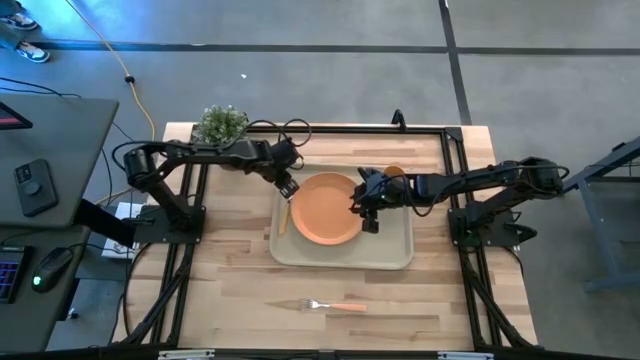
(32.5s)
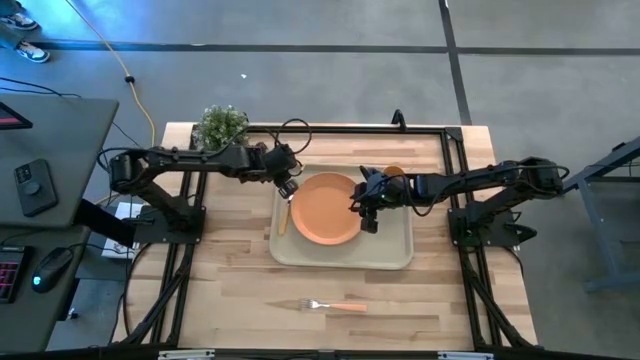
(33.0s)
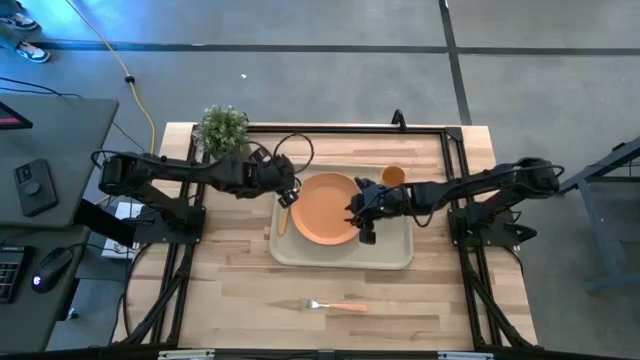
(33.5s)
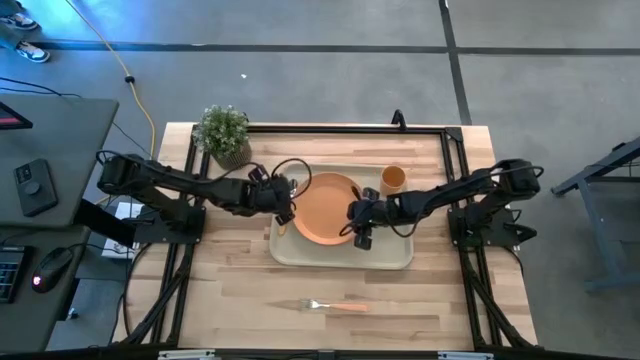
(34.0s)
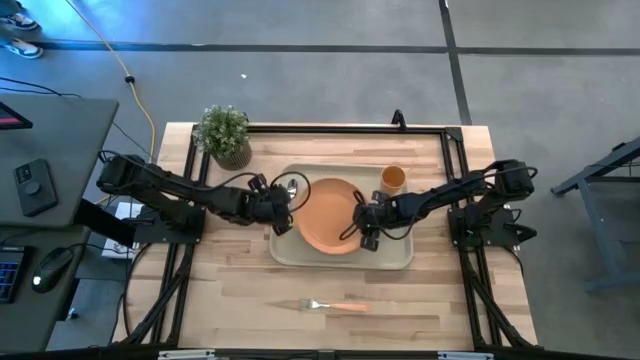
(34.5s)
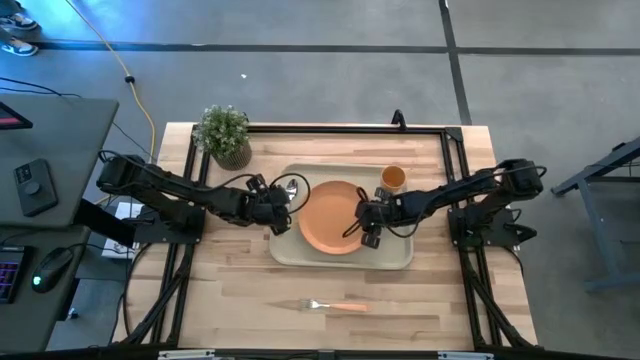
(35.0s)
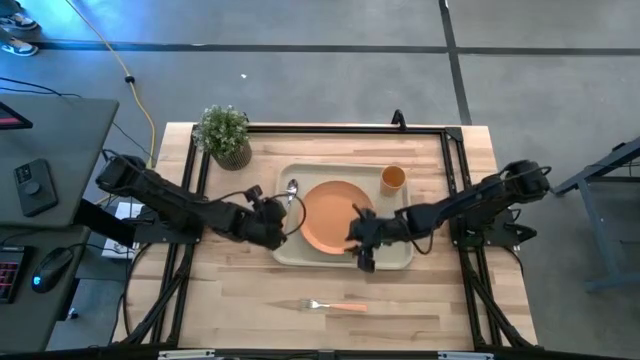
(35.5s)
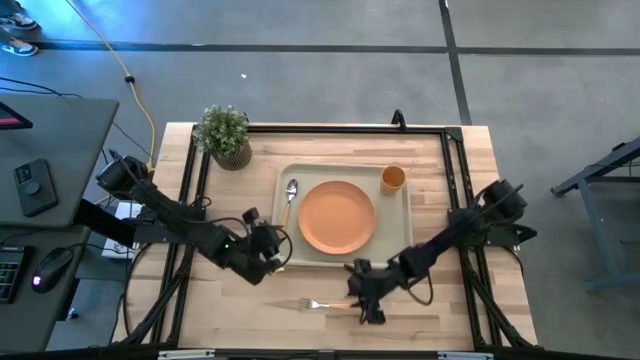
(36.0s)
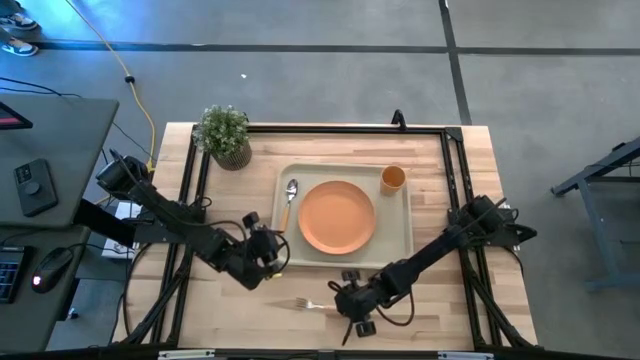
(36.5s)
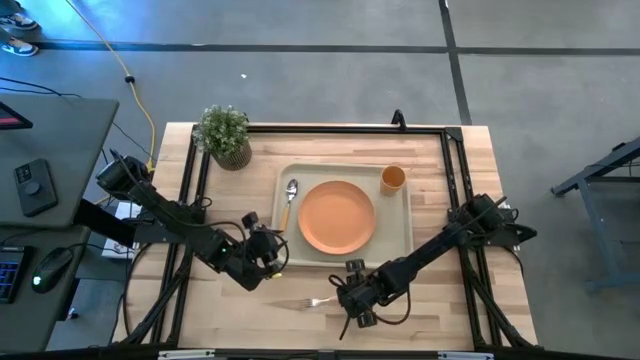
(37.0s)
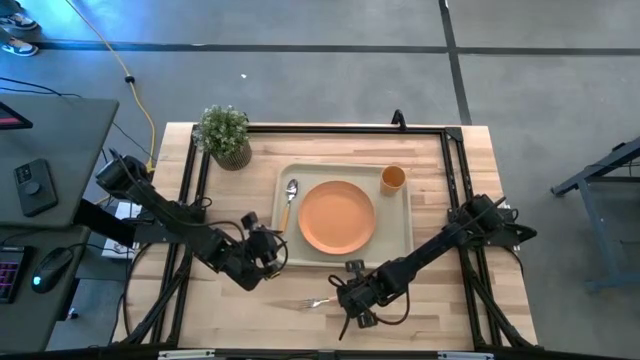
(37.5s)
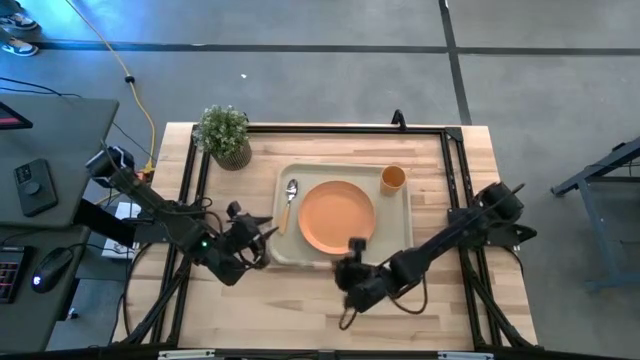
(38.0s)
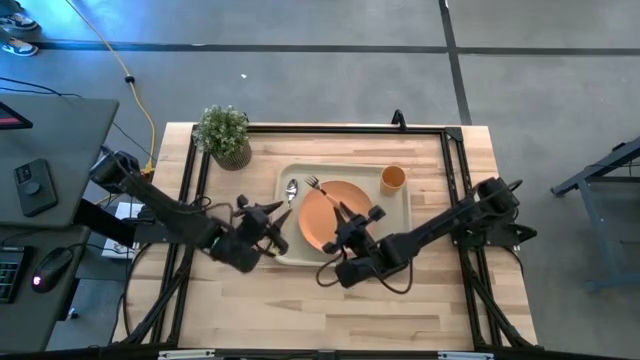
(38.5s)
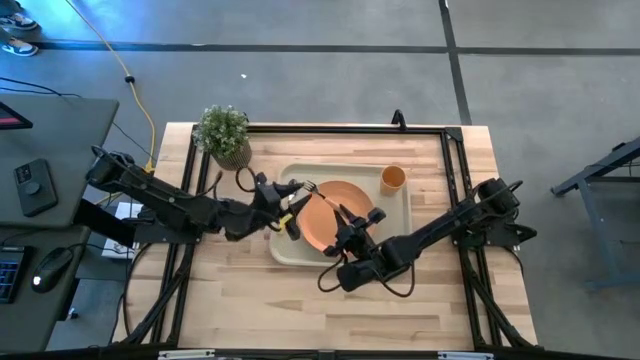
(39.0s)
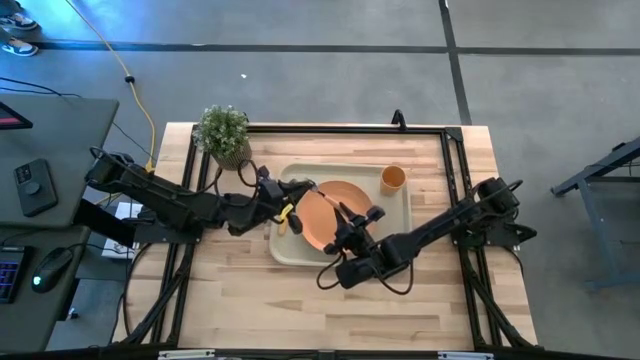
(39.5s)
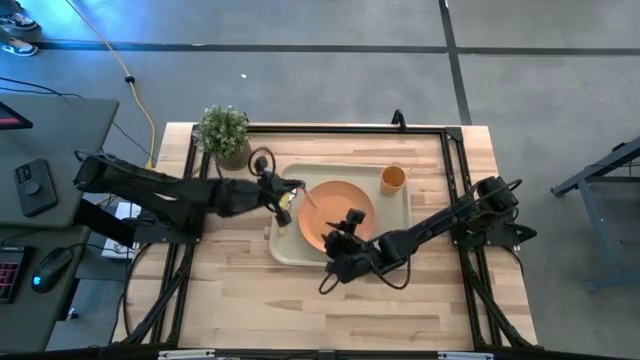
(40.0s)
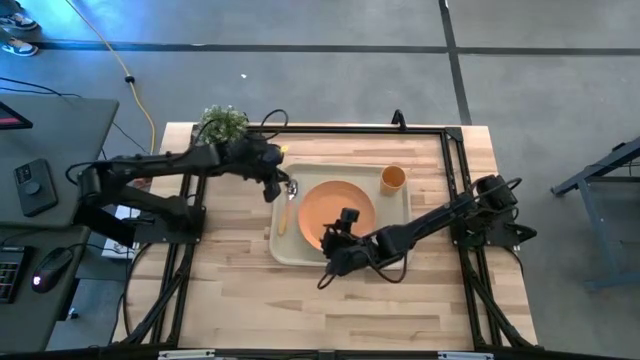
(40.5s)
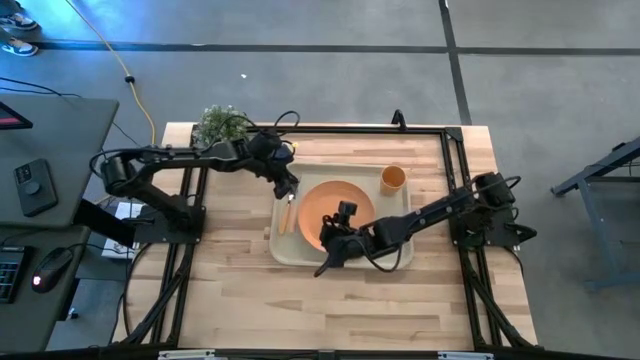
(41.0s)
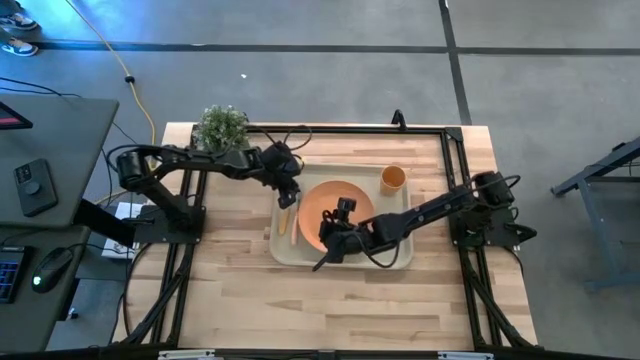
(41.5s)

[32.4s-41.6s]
Task: Pick and place plate/cup/fork/spoon on tray
Put the orange fork to the left of the orange plate on the tray

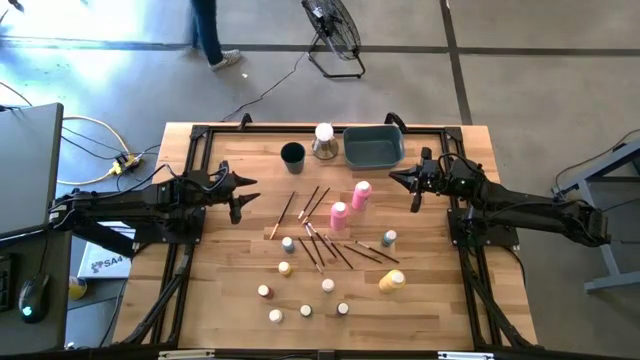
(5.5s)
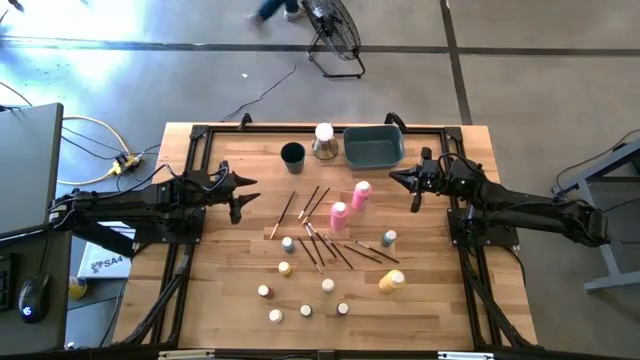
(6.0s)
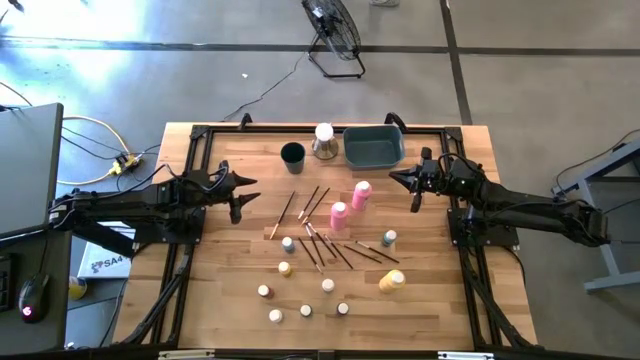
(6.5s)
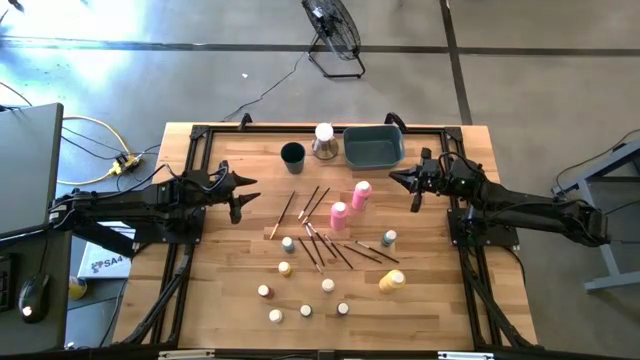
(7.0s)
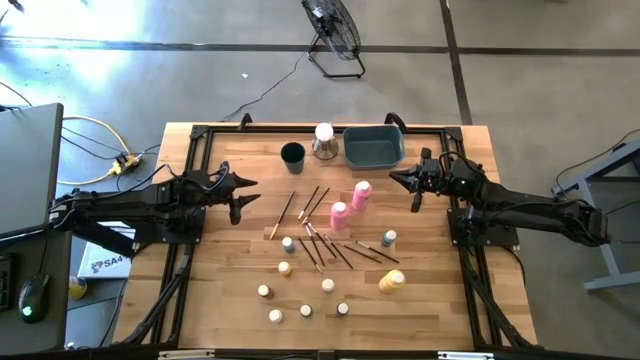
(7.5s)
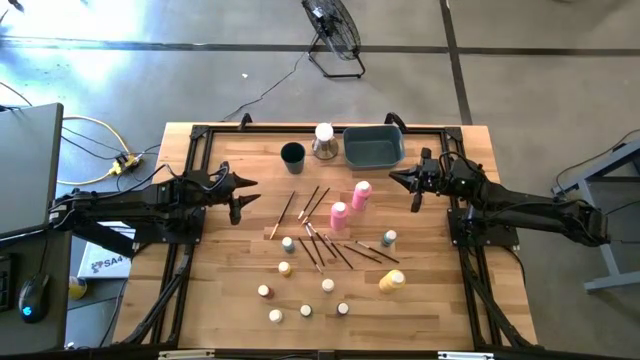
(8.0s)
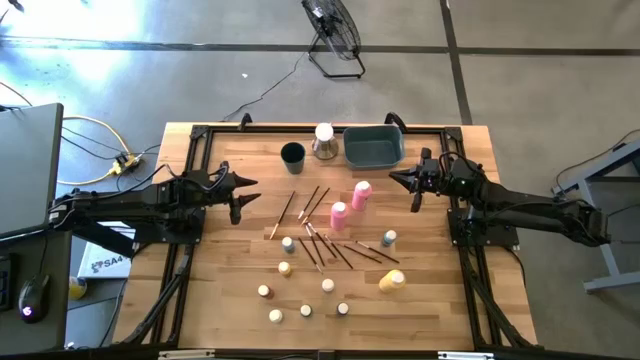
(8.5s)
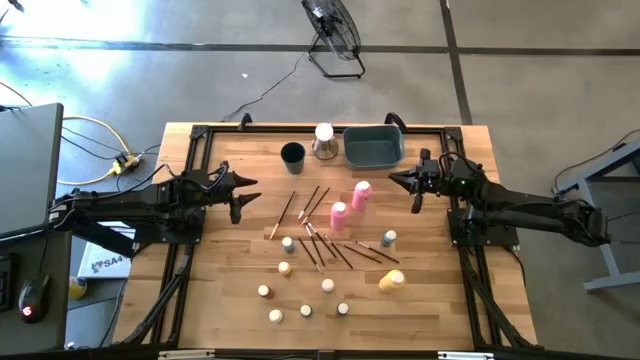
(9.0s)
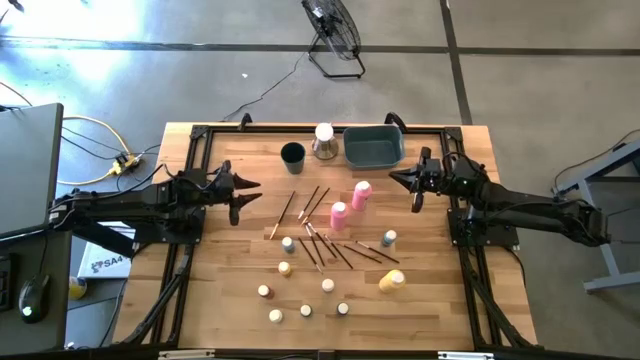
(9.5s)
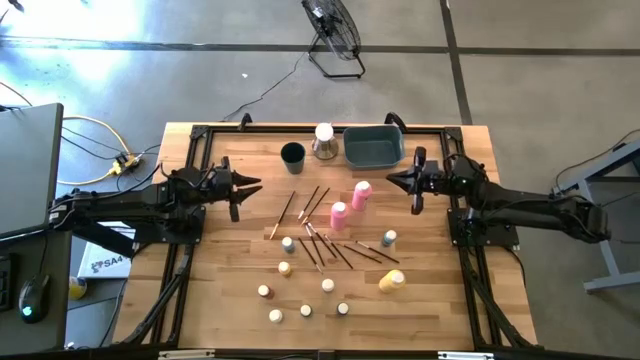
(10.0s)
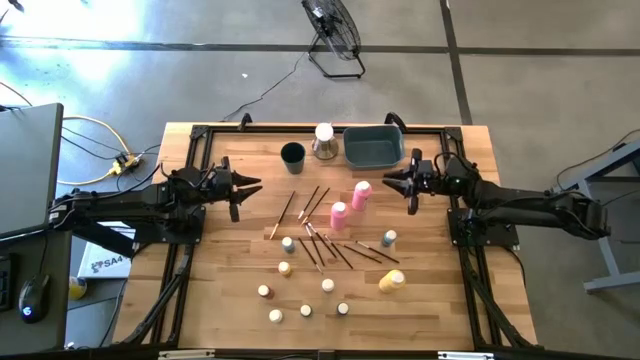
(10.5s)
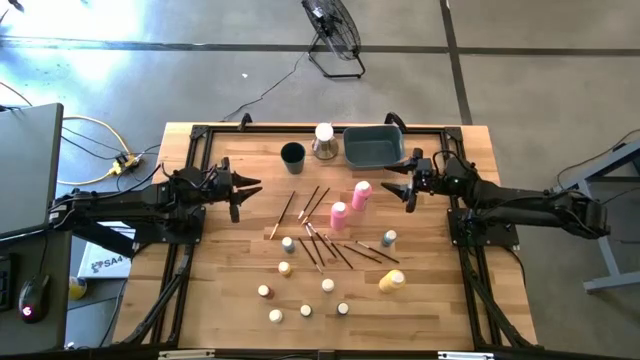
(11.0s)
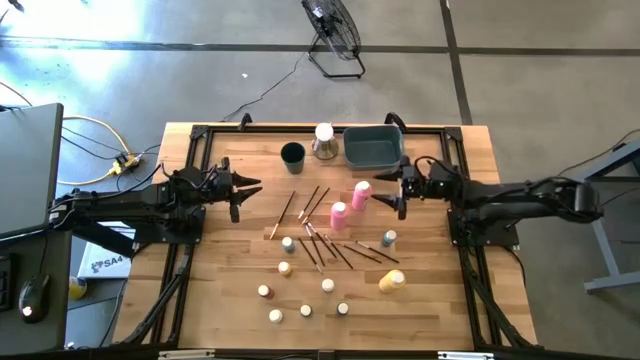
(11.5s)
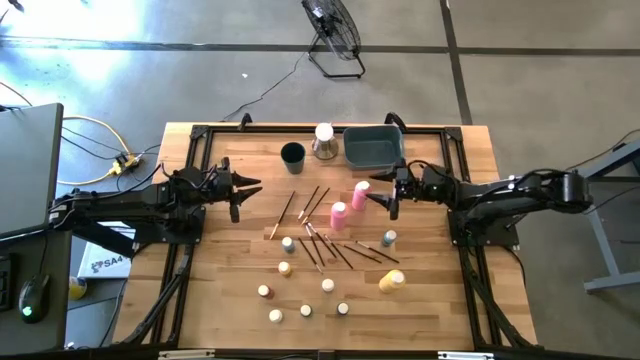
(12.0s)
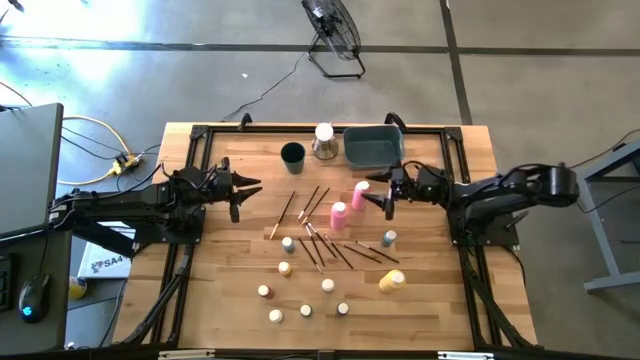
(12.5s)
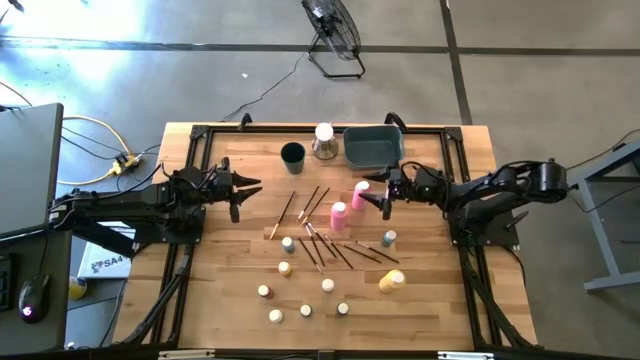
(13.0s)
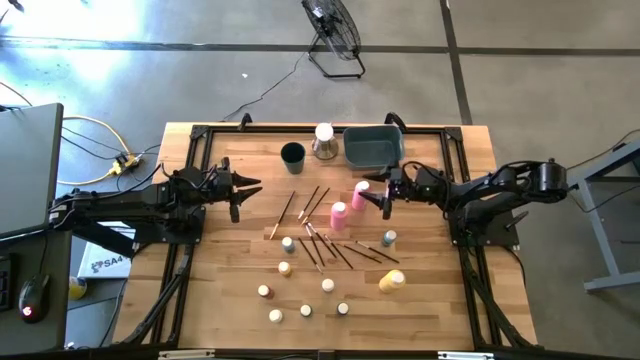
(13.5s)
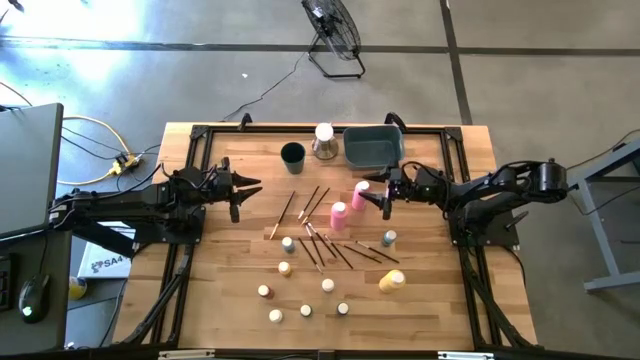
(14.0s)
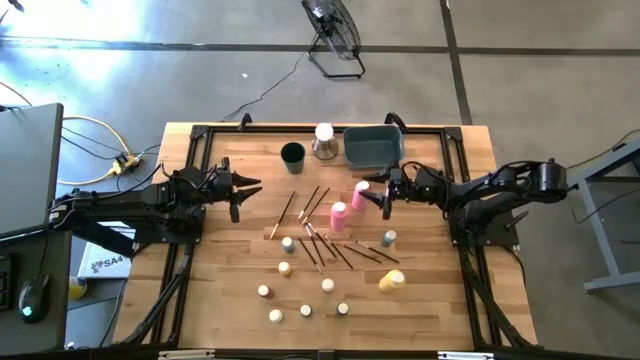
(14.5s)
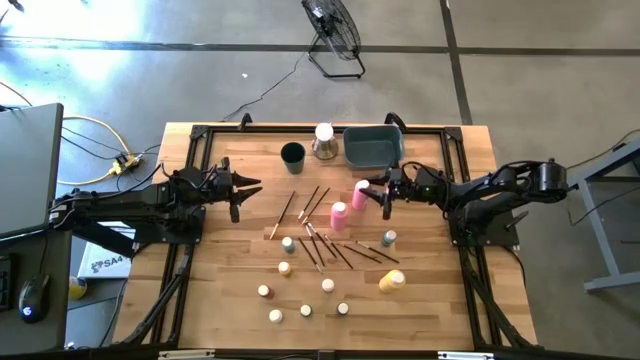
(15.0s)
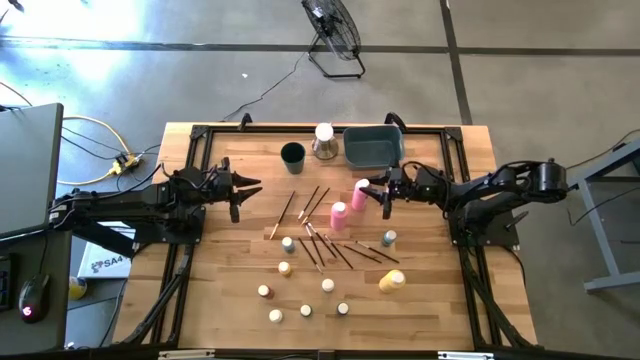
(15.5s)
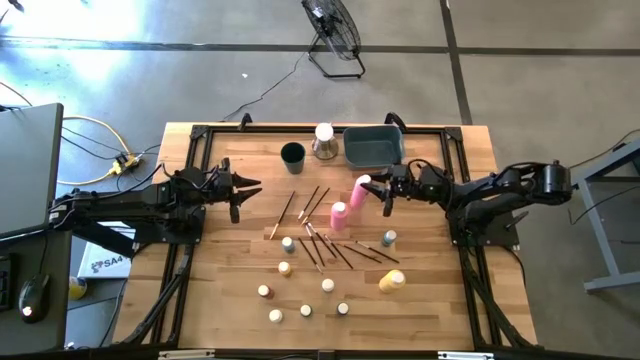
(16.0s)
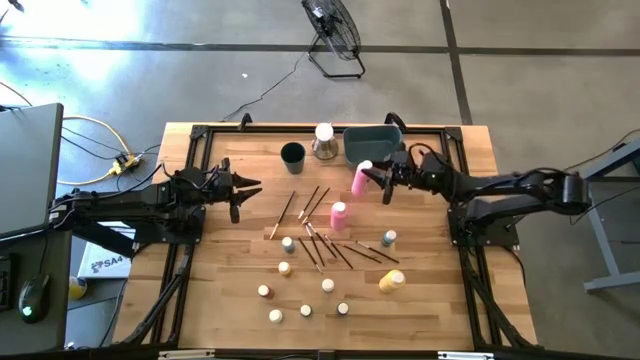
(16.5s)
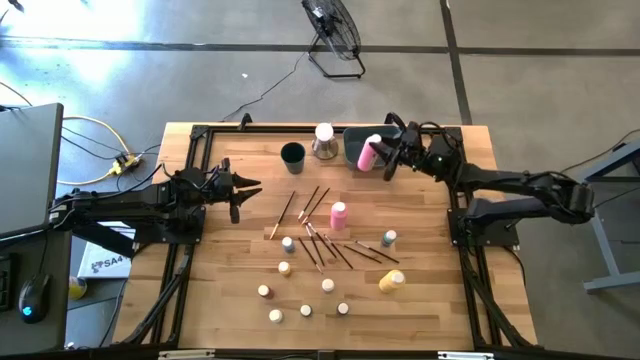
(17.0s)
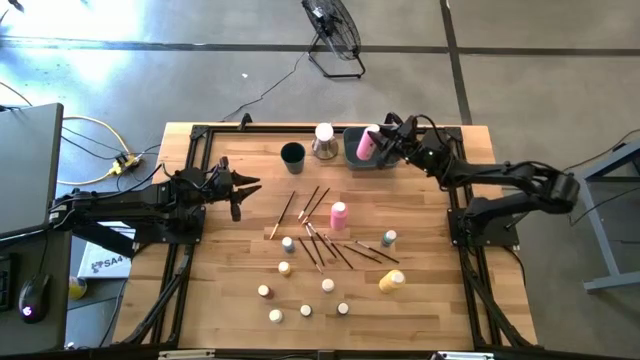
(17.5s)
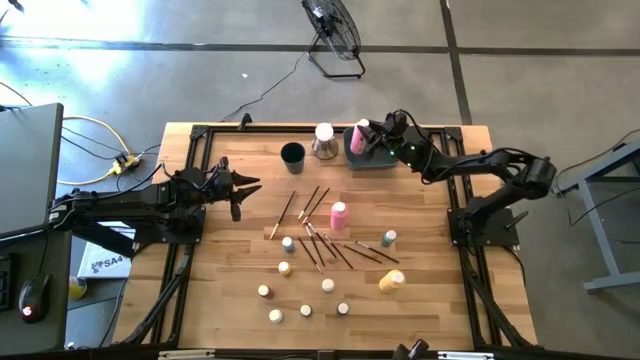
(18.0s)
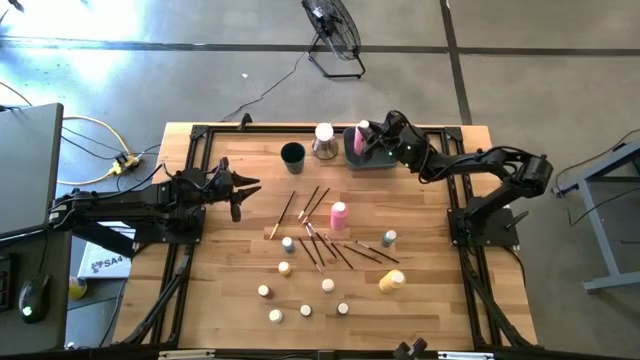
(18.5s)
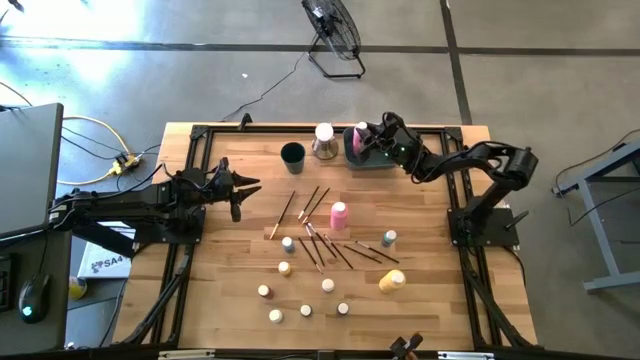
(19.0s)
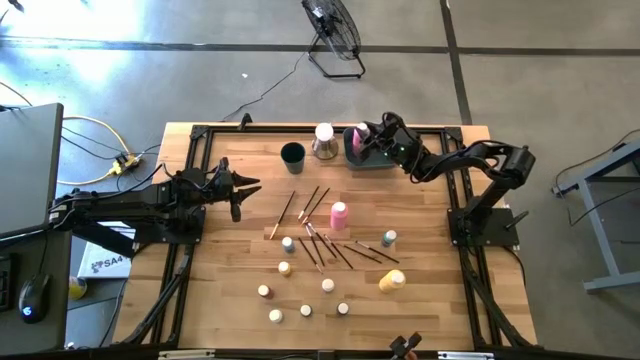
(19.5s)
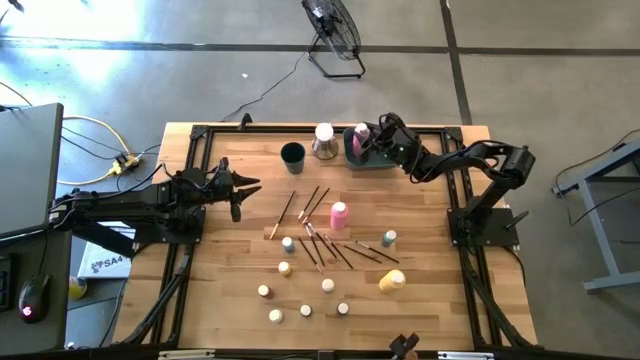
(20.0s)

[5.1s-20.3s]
Task: Pick & Place Paint Supplies
Put the large pink paint bottle into the blue bin
